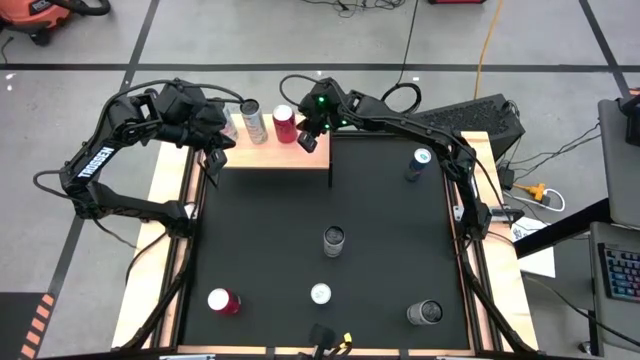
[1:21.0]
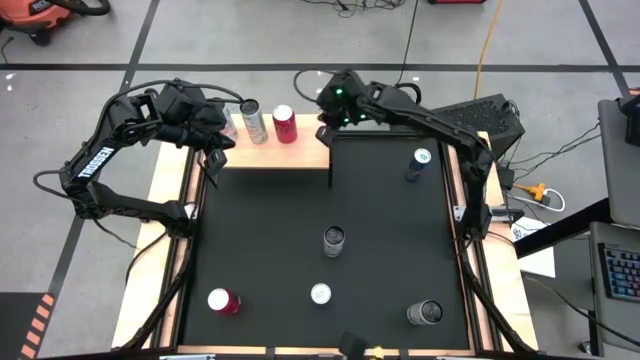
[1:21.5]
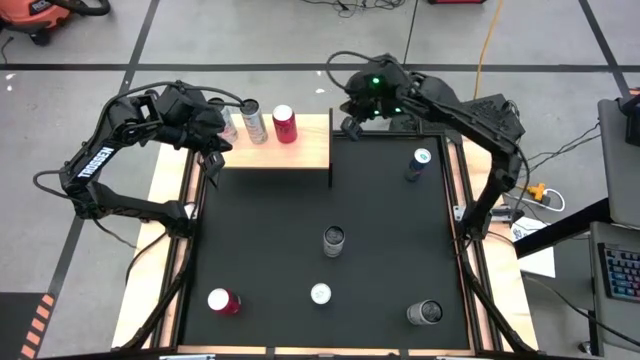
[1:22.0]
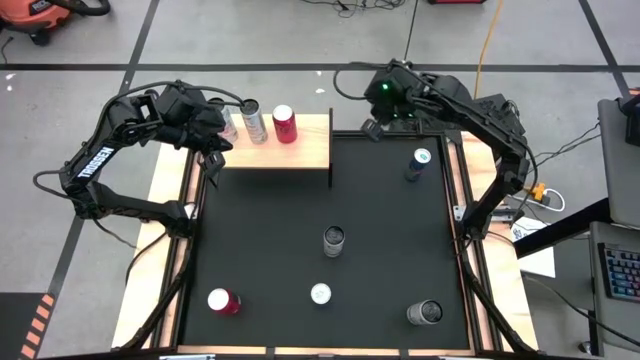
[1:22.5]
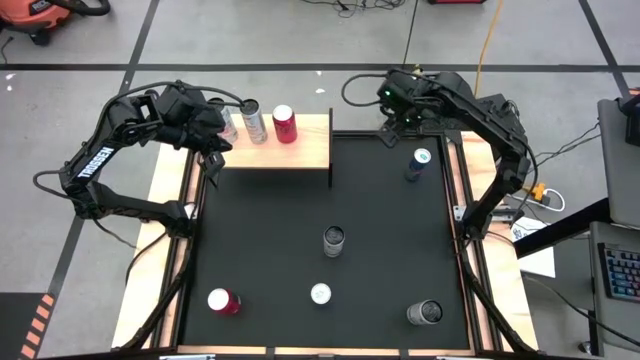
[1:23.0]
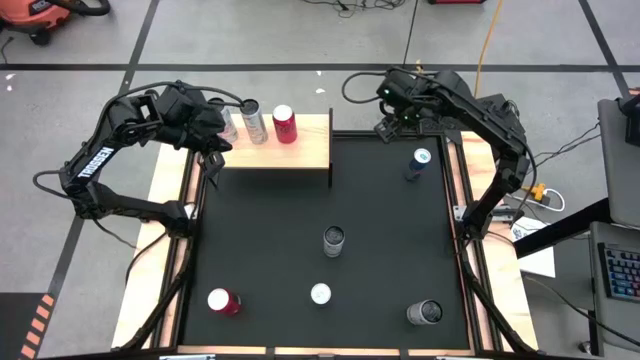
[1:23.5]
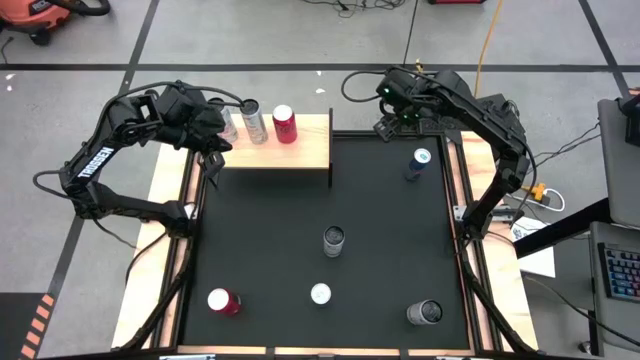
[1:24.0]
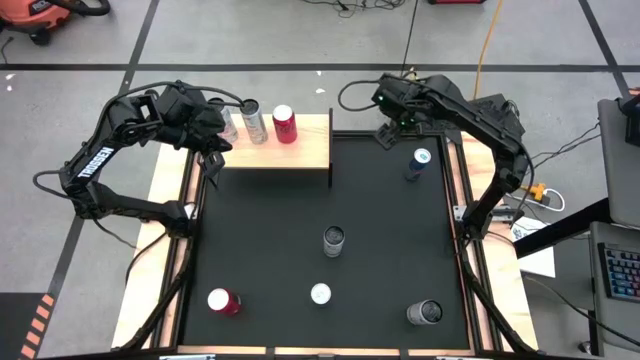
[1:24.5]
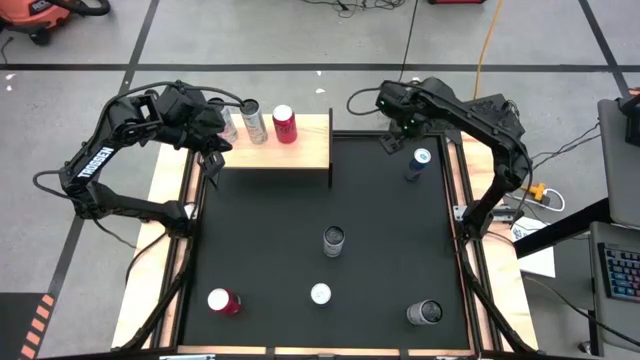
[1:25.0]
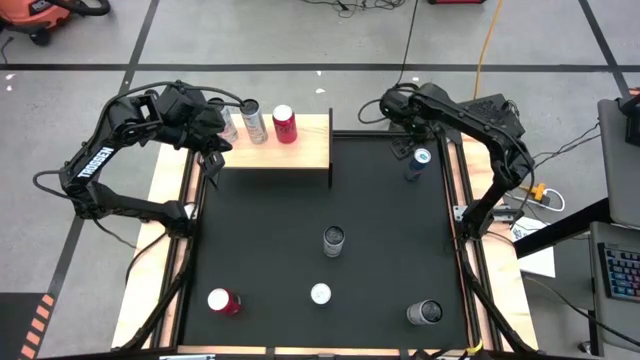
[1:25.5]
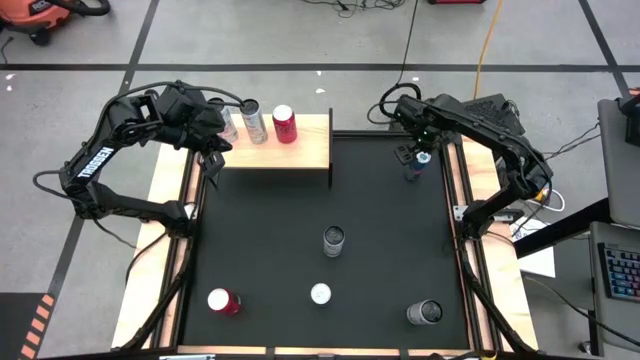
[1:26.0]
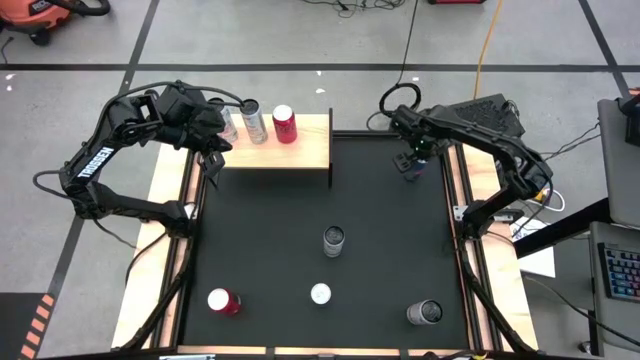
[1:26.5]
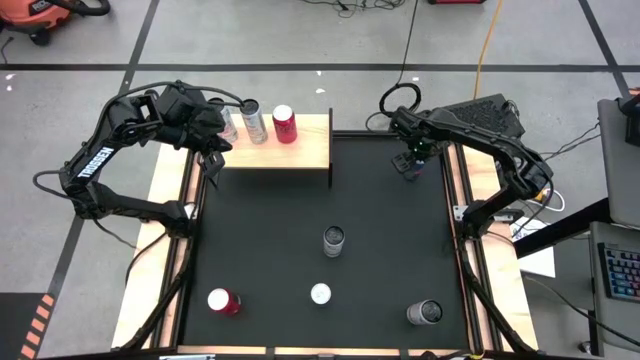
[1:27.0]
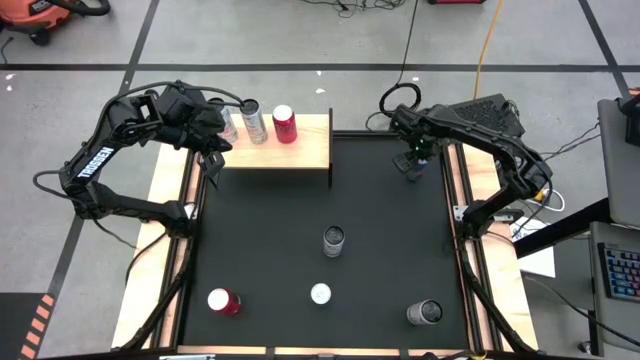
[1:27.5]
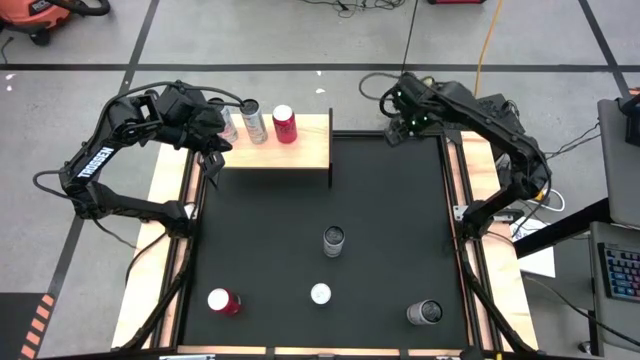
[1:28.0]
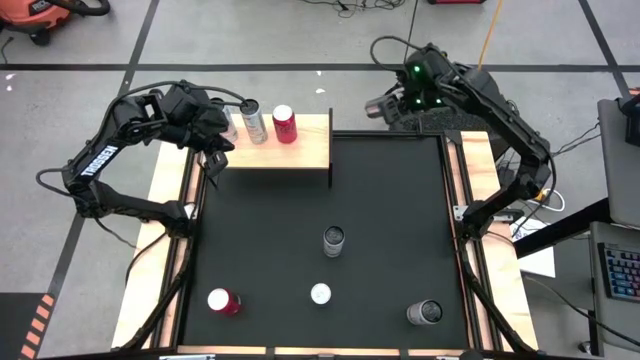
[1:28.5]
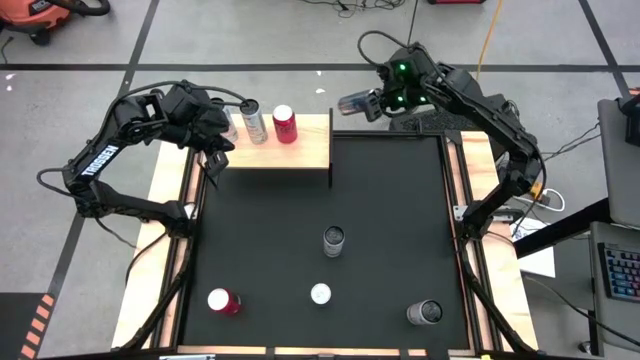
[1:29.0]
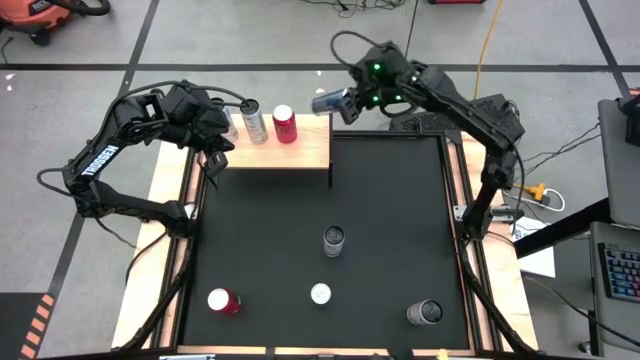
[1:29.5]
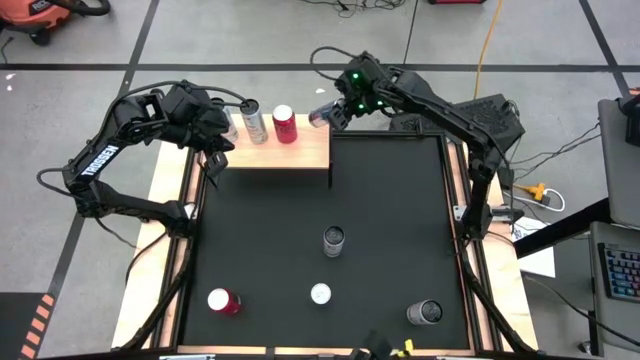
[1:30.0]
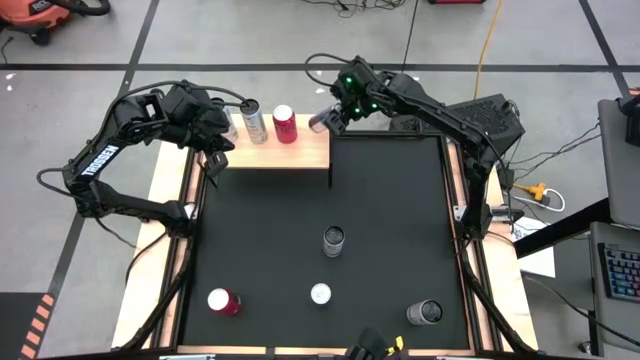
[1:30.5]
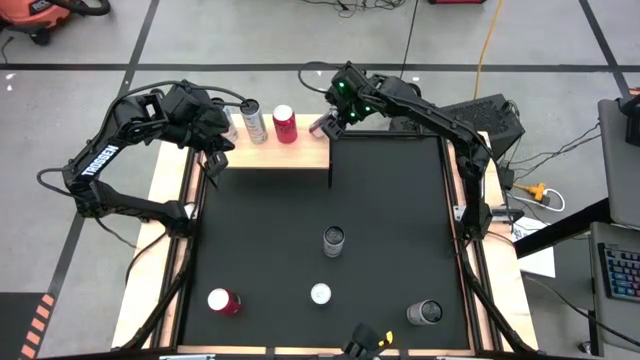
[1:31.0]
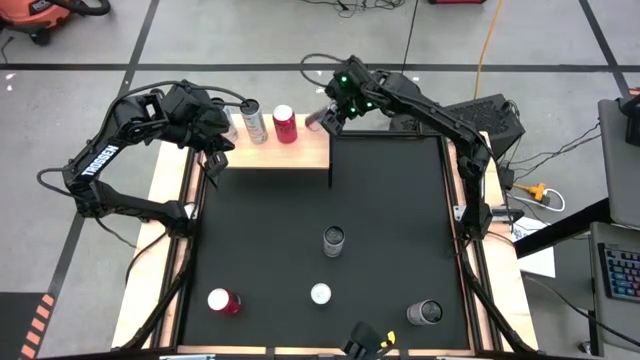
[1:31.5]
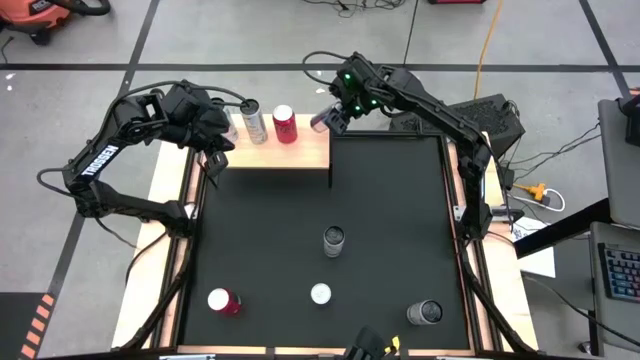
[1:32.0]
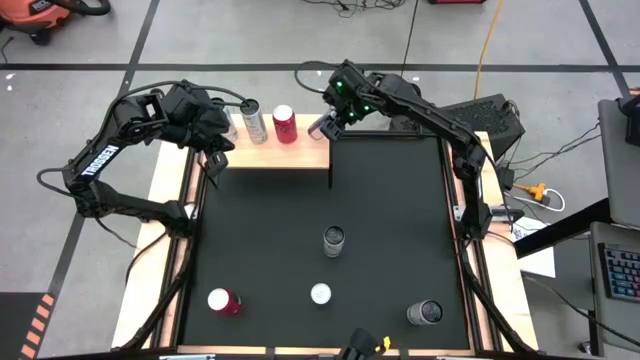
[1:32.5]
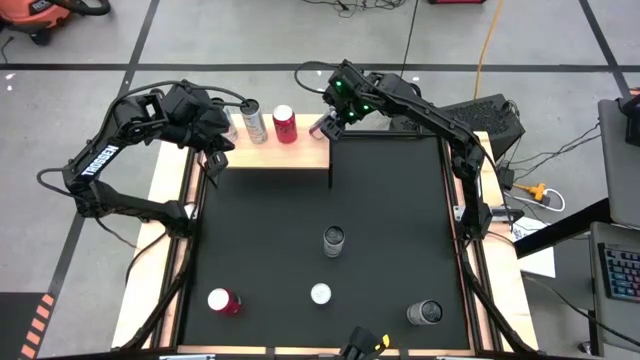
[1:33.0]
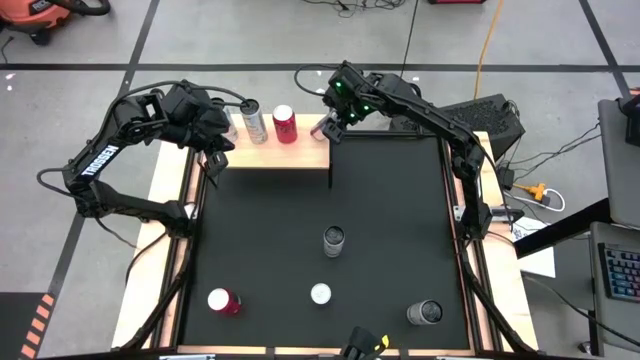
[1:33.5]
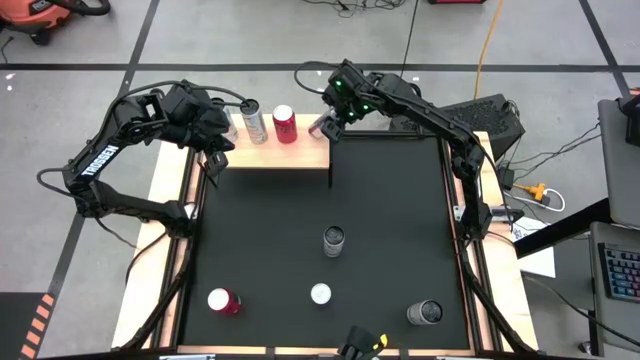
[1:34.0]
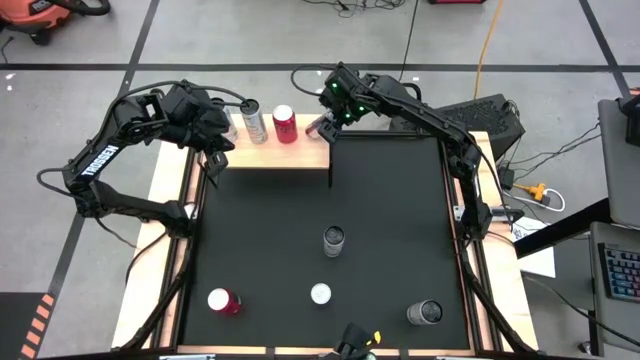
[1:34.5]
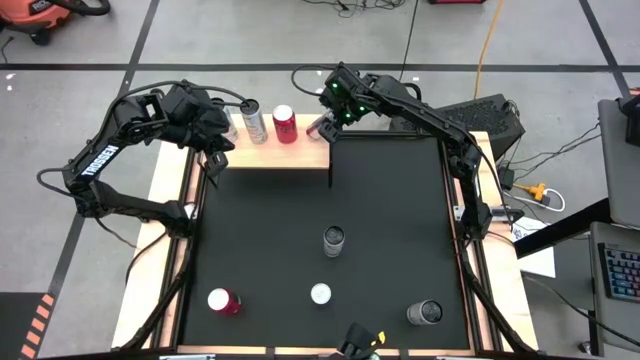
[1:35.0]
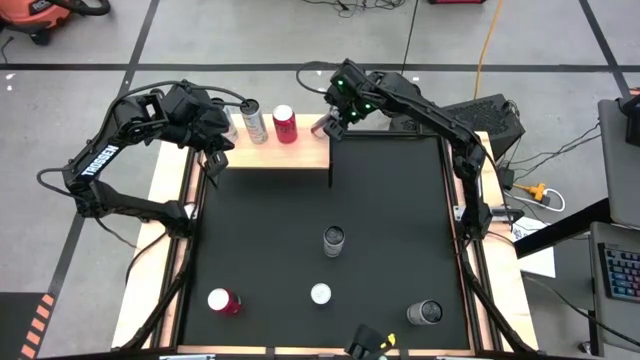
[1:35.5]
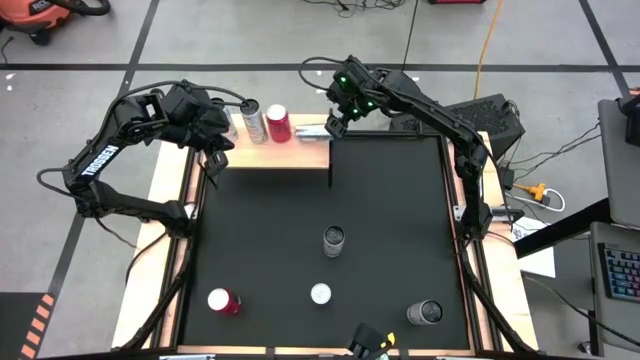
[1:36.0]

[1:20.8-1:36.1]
Task: Place canned beverage on shelf
Put the top blue soda can on the shelf

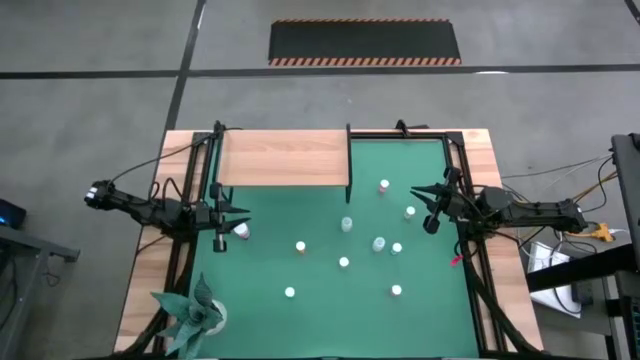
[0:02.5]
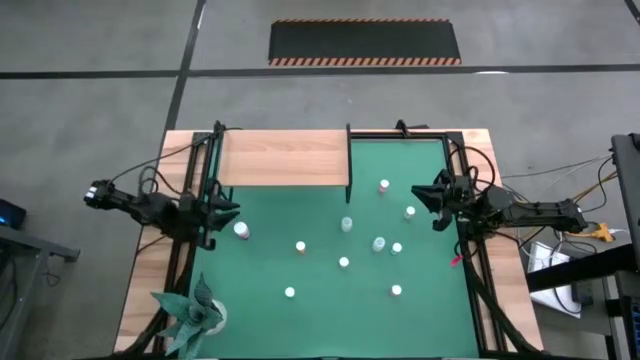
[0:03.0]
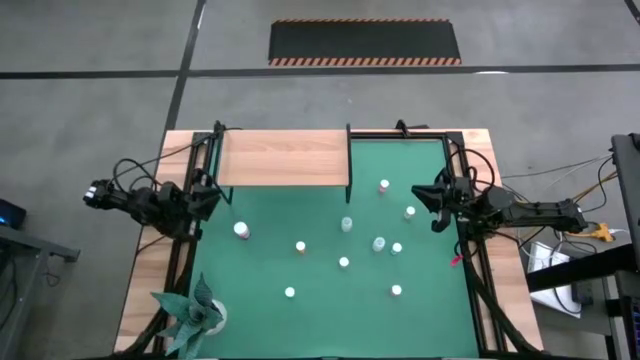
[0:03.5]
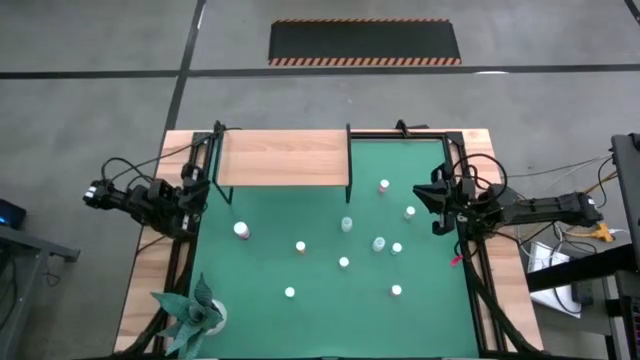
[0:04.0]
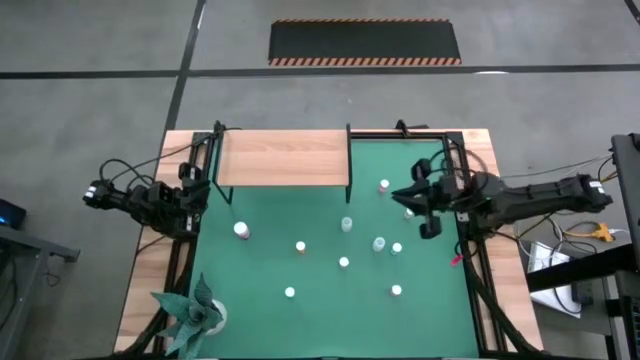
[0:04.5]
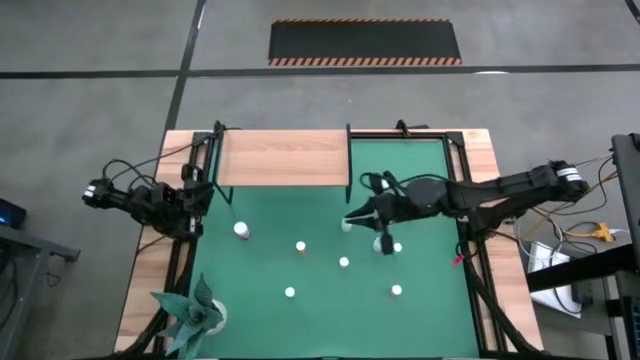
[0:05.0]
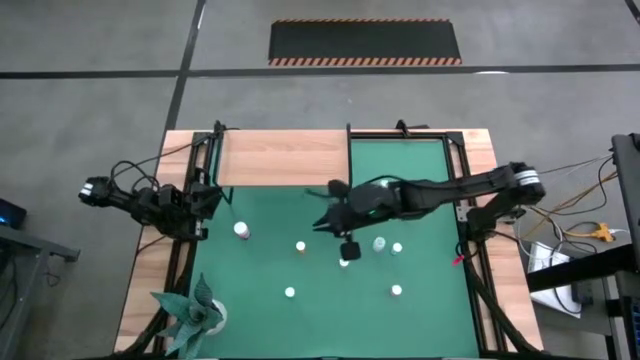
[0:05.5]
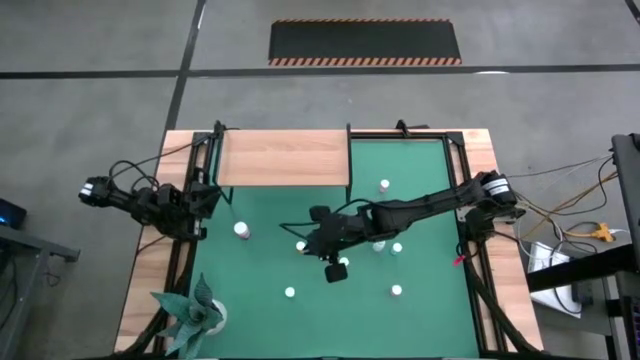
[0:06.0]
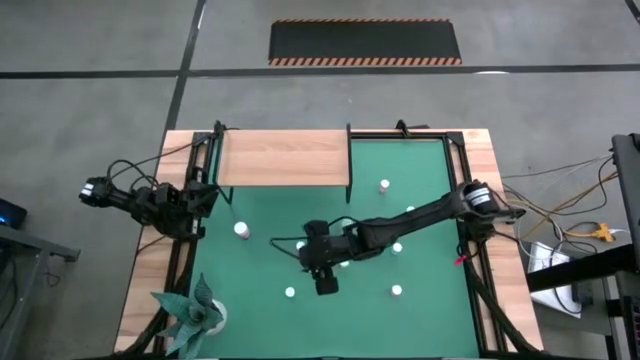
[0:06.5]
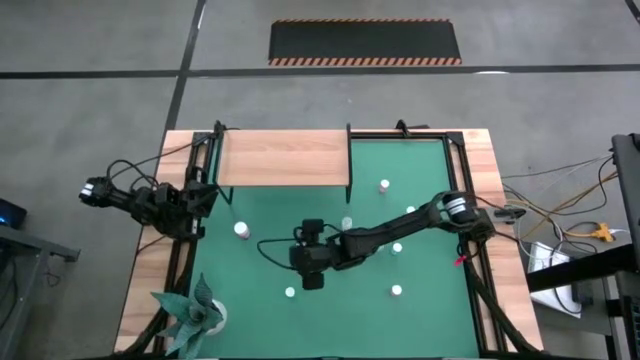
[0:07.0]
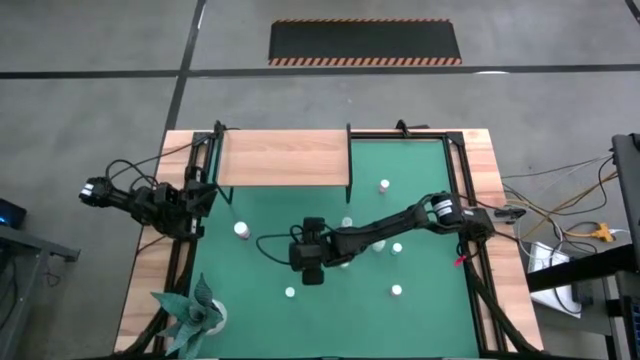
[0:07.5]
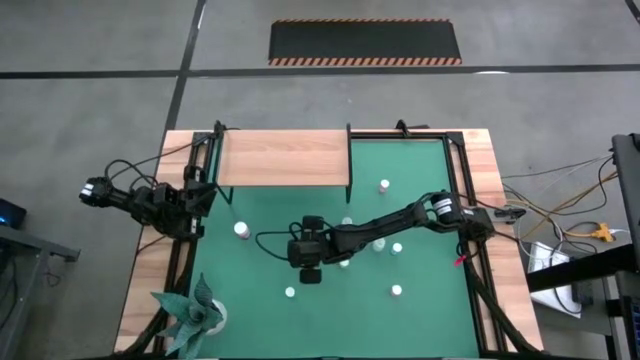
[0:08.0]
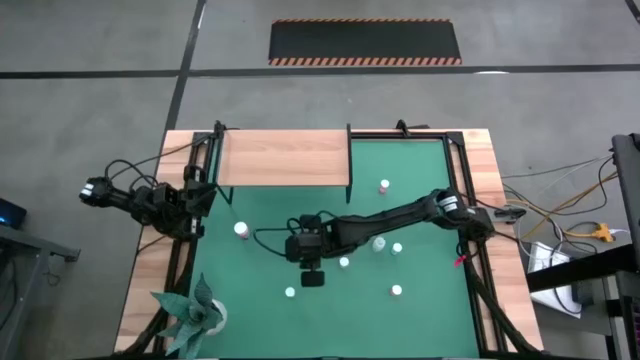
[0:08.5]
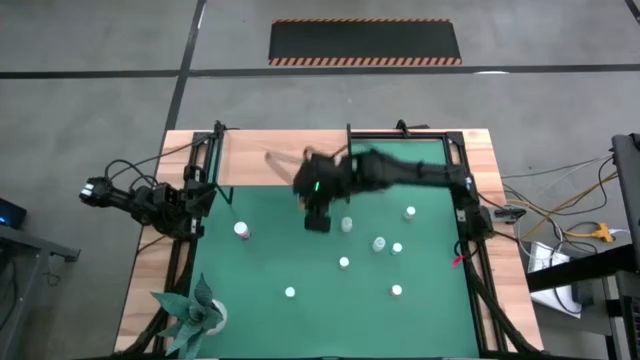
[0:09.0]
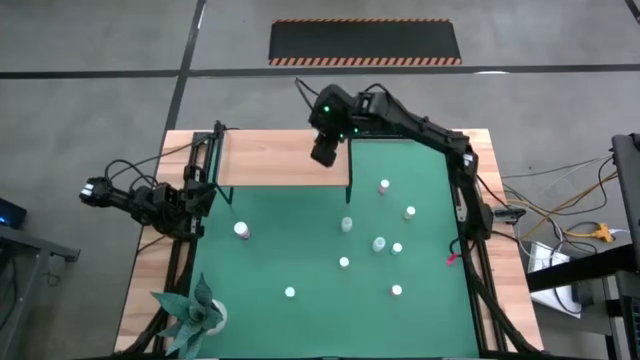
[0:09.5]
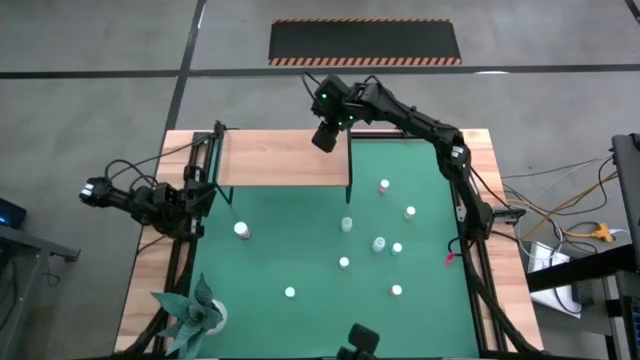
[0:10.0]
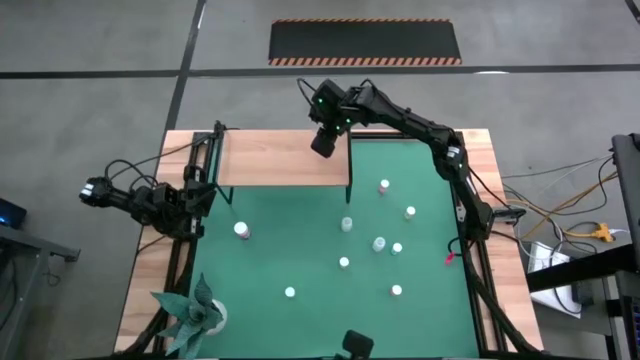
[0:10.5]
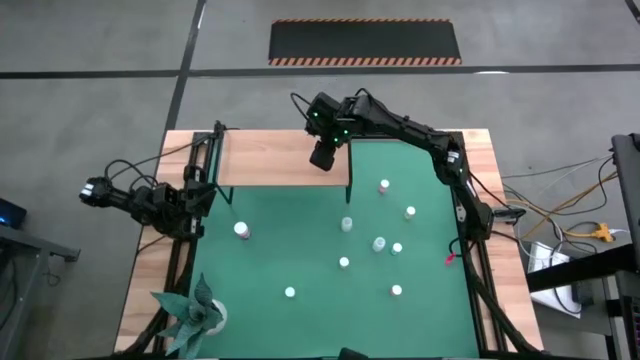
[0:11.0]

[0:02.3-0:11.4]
Task: Pick and place medicine bottles onto shelf by color
Put the orange pill bottle on the shelf
